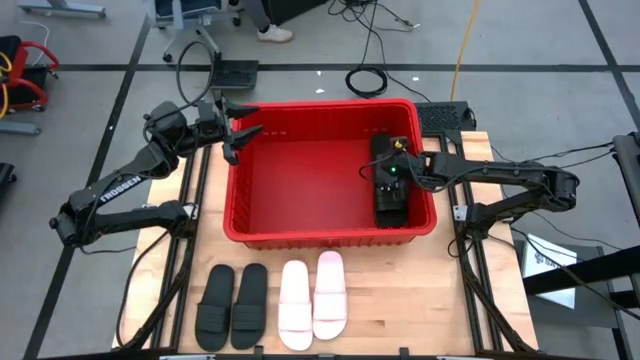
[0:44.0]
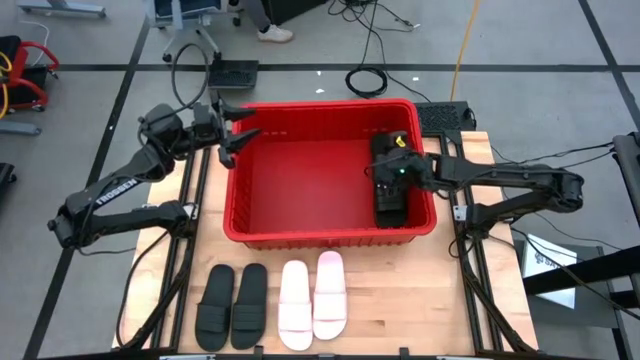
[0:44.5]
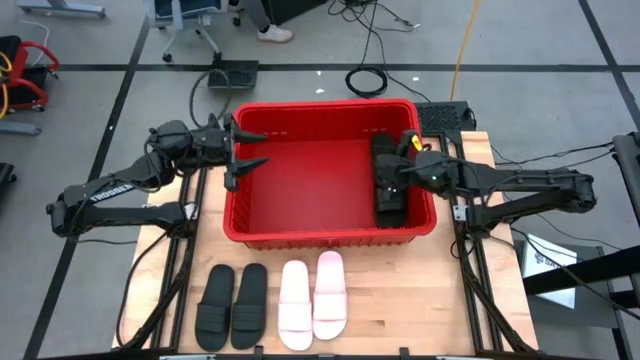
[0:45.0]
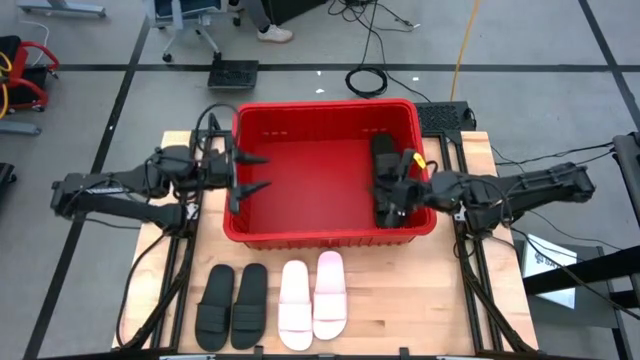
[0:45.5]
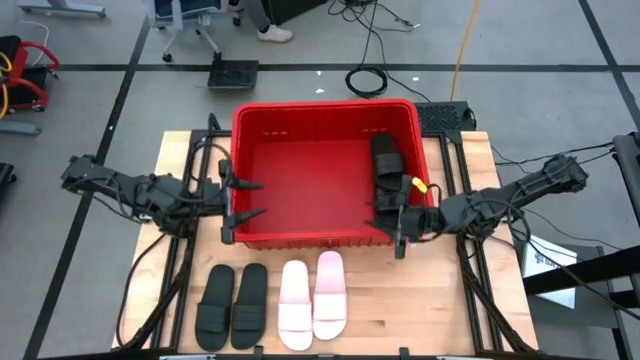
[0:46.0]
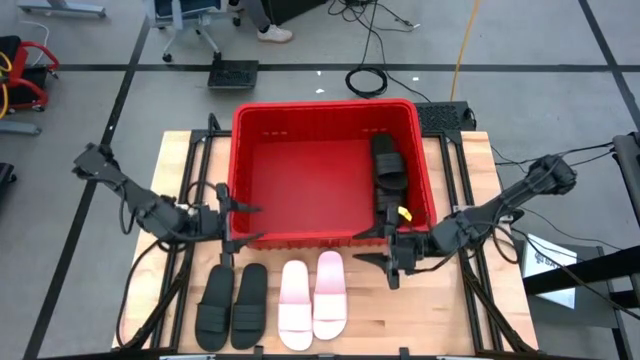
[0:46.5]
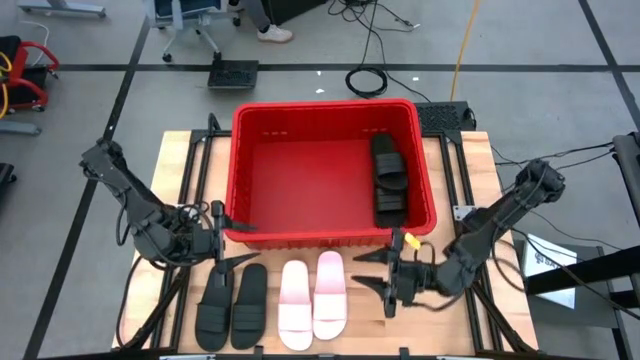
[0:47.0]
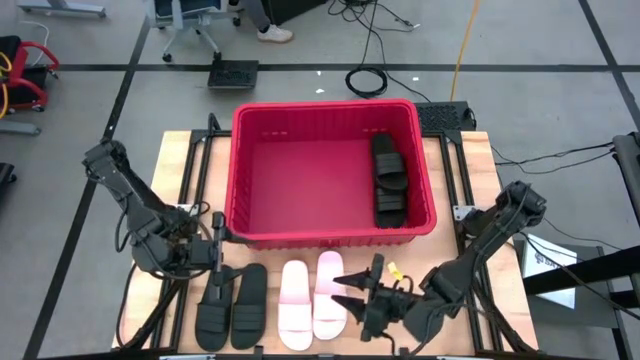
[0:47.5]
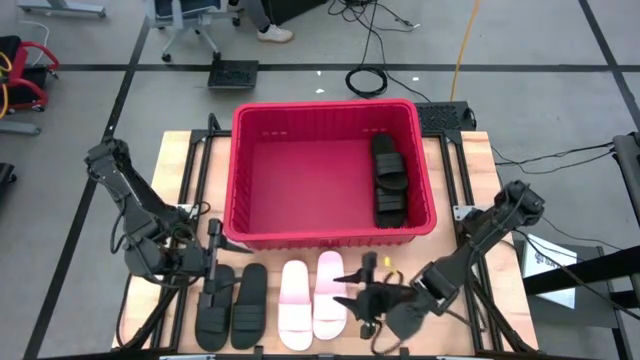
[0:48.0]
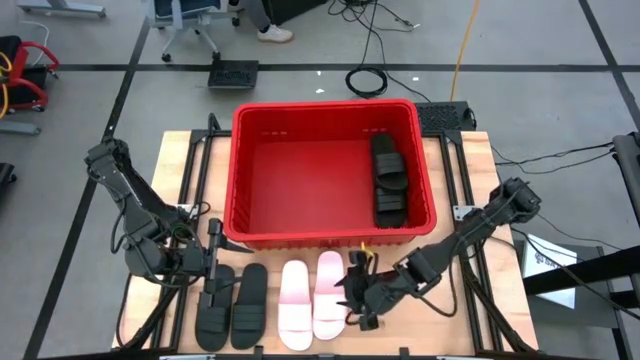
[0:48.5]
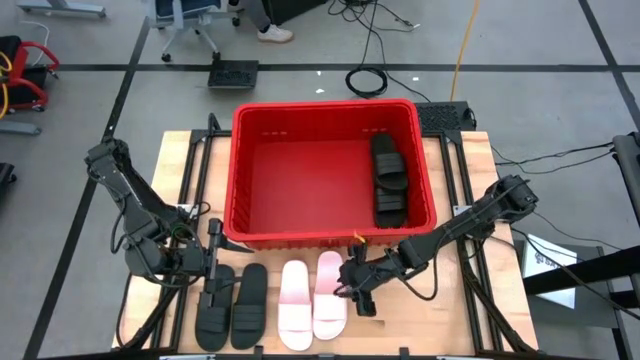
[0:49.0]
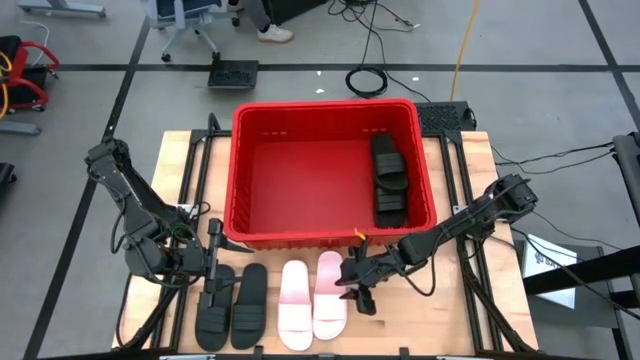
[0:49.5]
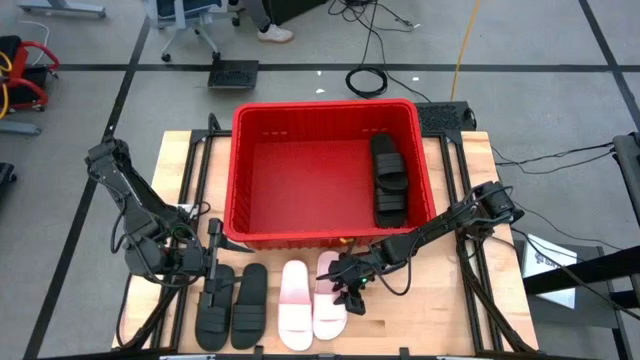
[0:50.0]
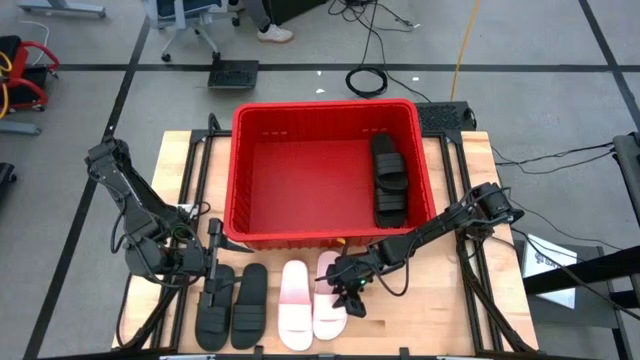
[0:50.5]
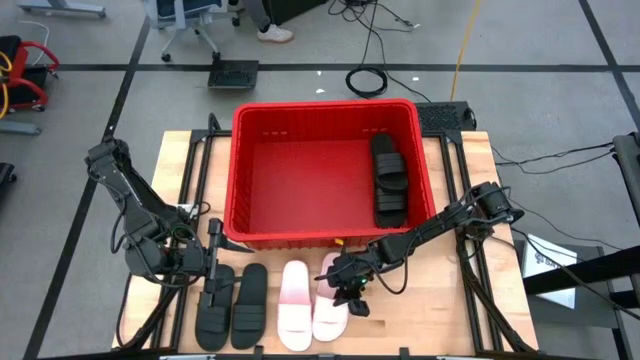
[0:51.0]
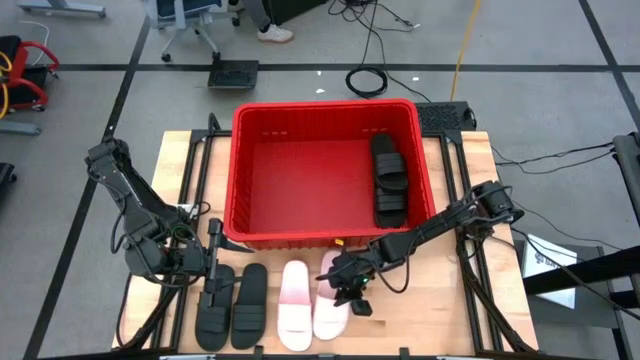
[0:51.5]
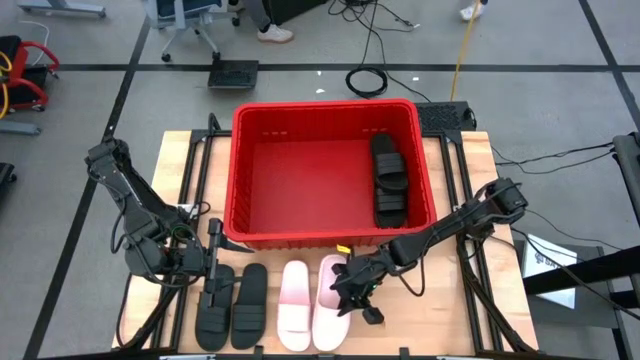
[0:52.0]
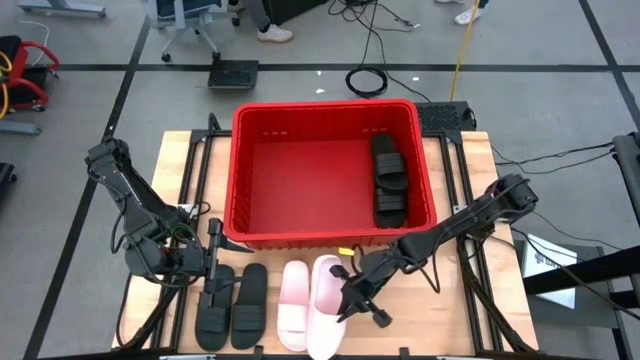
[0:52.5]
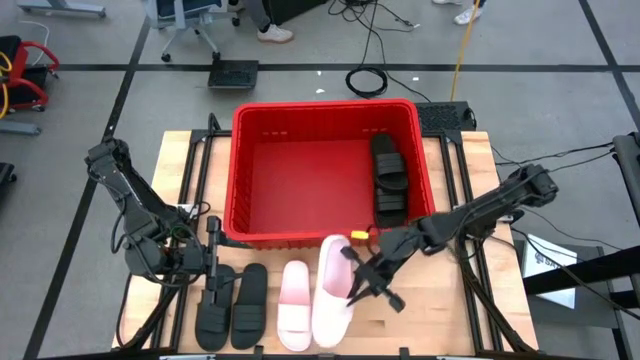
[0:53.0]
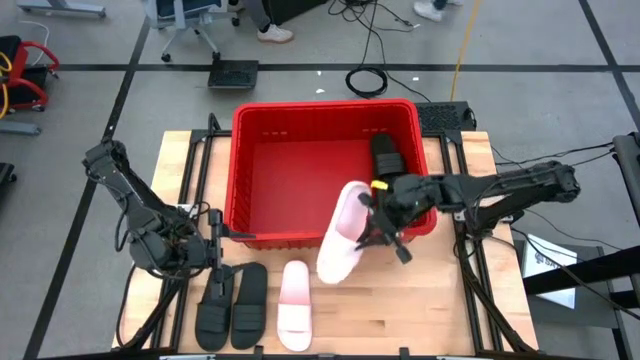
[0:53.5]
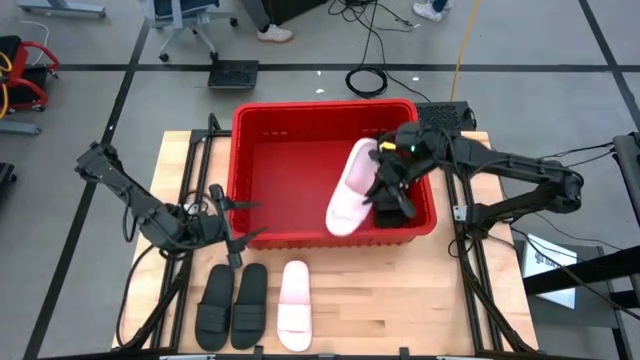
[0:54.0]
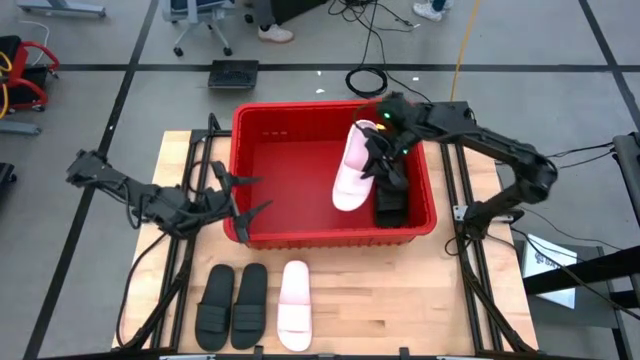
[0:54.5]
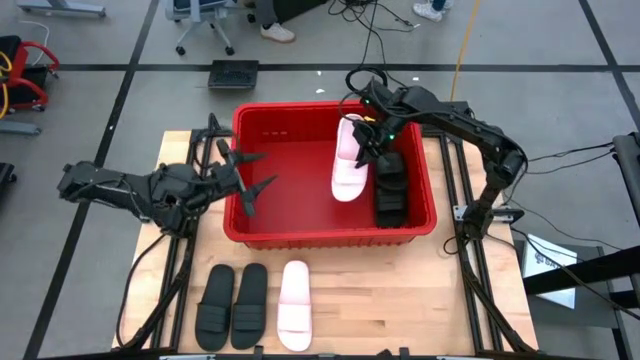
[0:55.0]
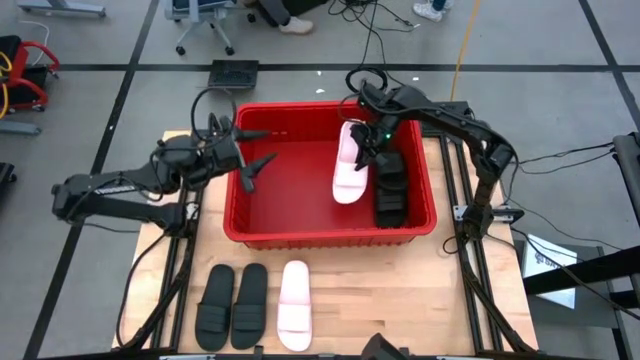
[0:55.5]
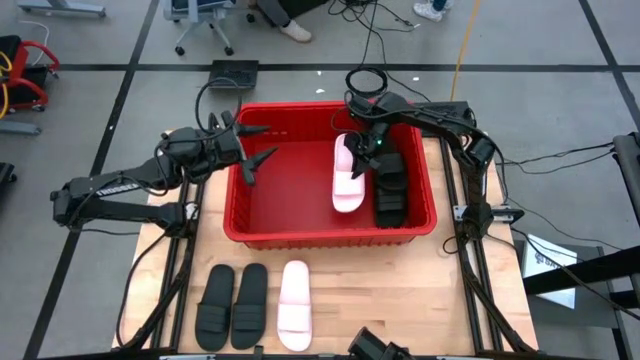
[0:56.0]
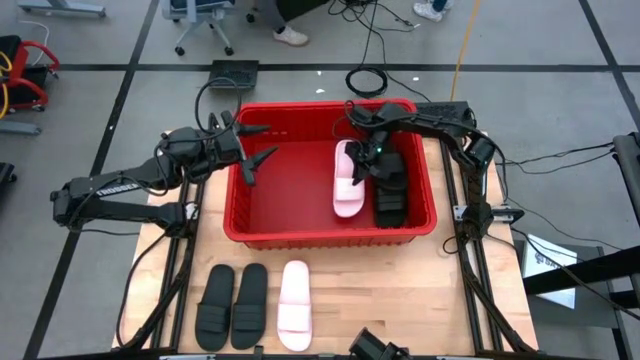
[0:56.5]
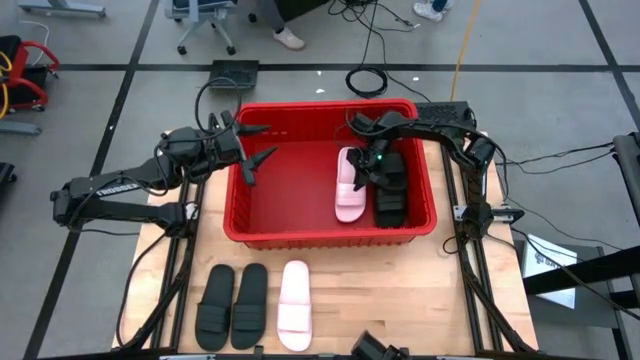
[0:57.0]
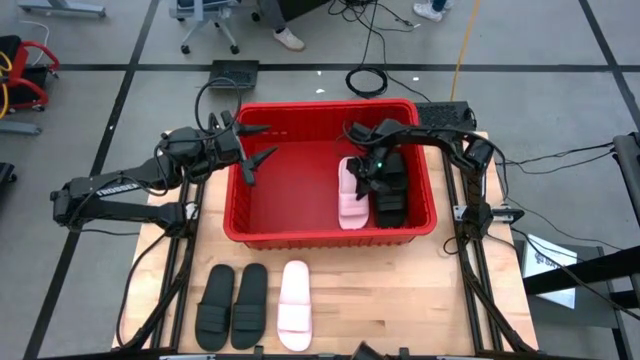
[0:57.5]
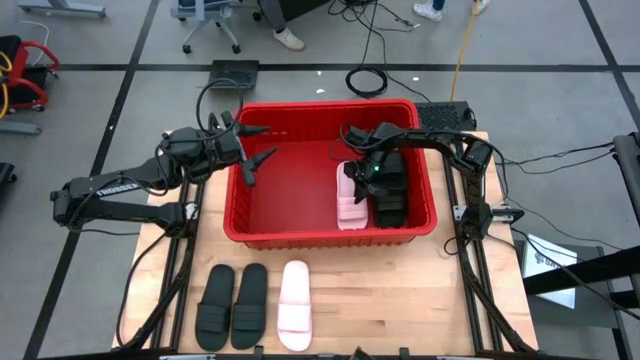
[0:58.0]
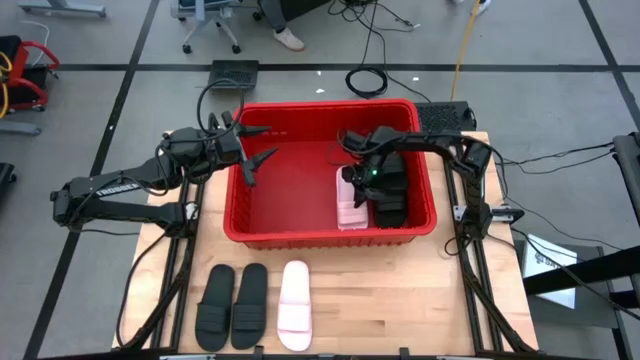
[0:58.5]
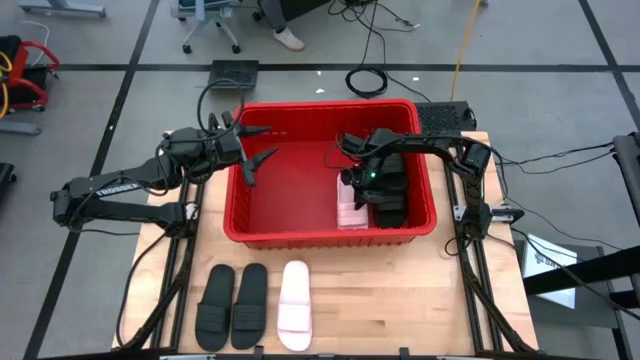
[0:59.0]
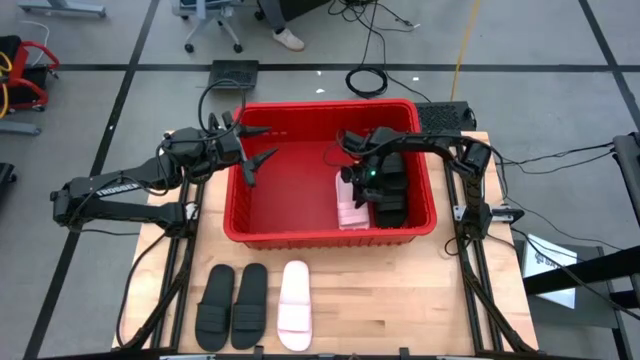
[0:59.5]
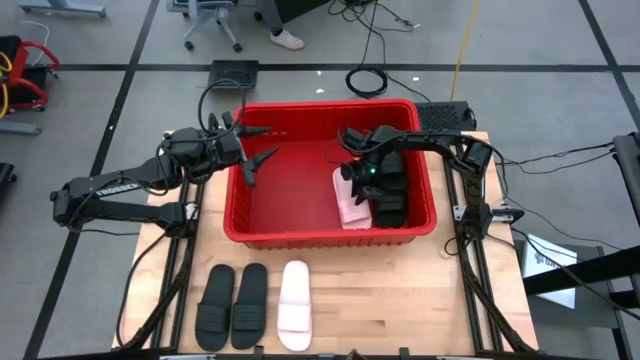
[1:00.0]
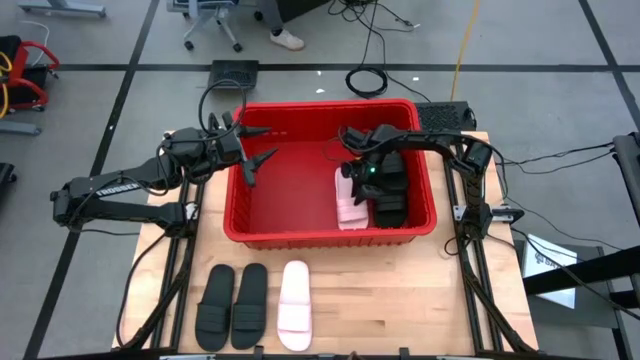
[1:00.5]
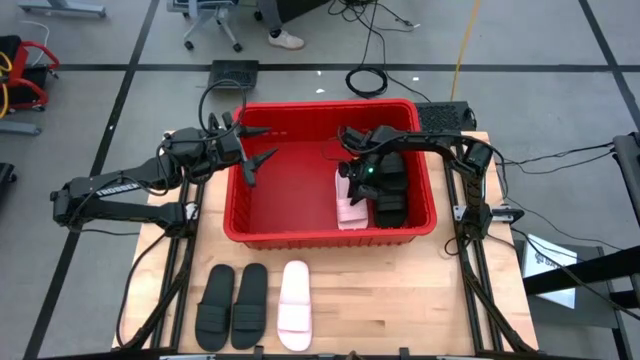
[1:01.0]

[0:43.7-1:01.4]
Task: Pick and place slides into bin
Put the right pink slide into the red container

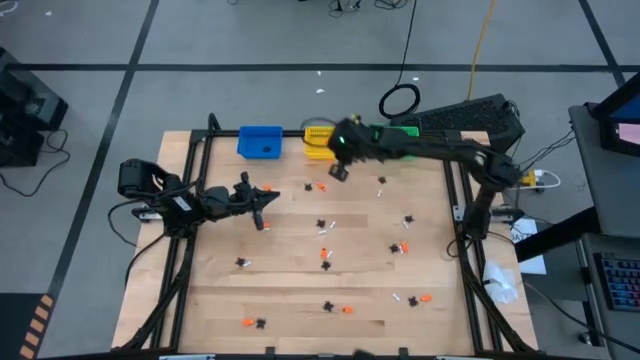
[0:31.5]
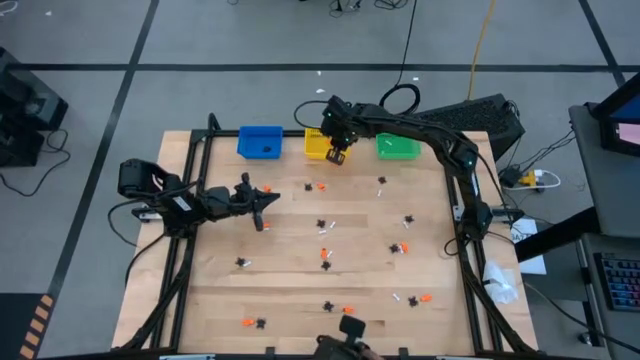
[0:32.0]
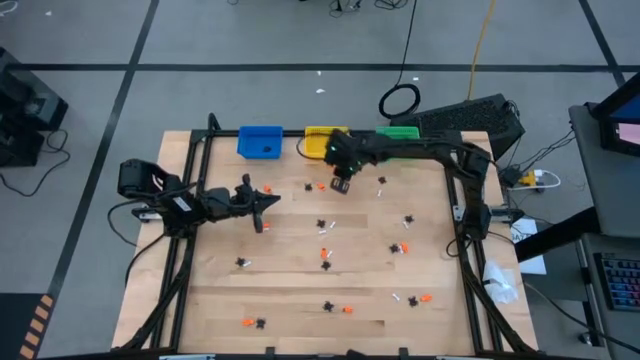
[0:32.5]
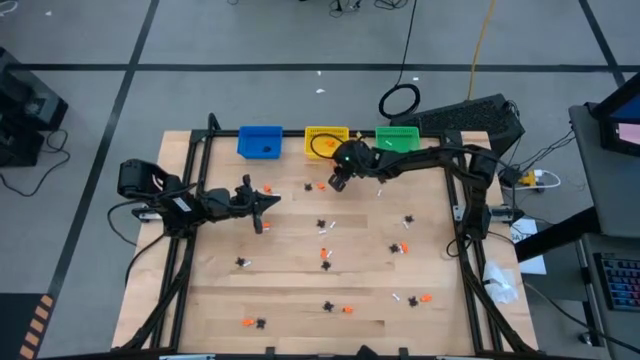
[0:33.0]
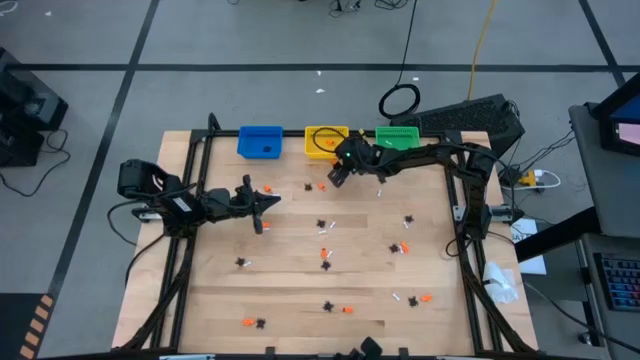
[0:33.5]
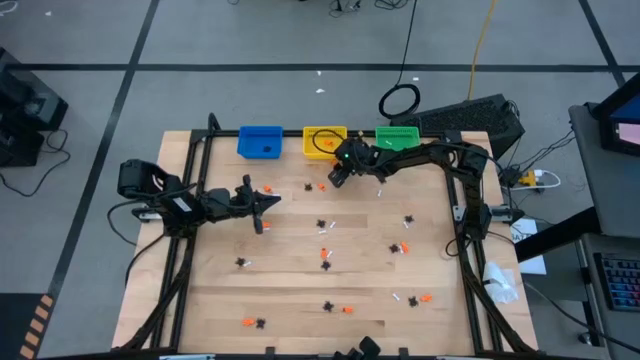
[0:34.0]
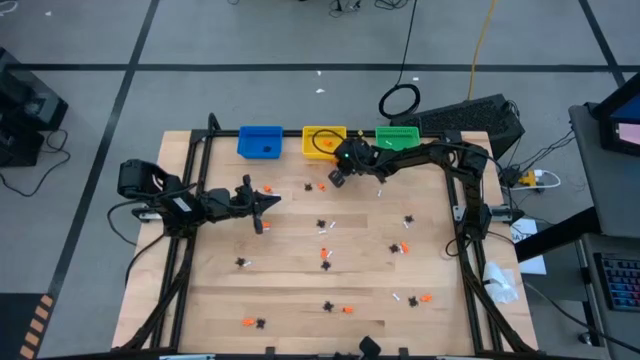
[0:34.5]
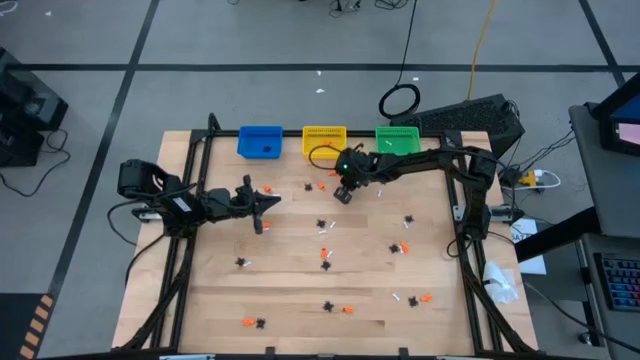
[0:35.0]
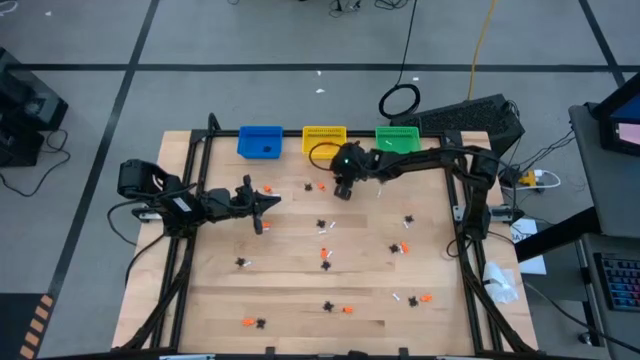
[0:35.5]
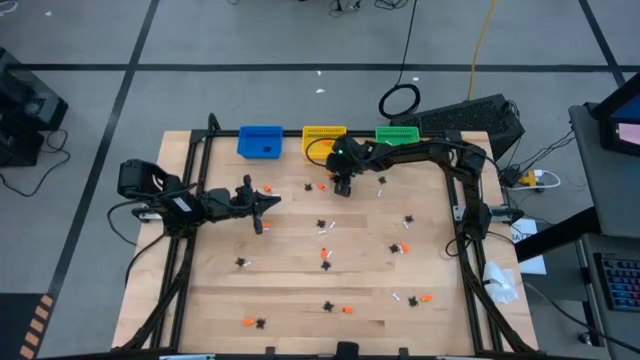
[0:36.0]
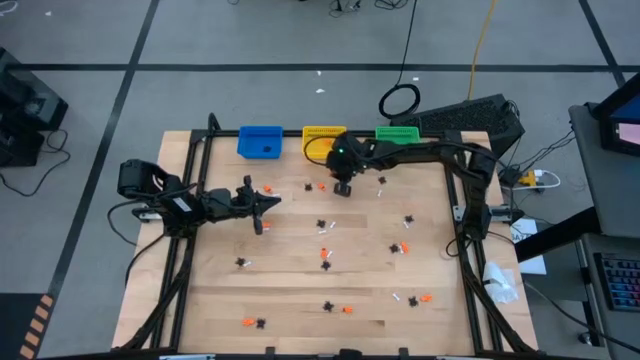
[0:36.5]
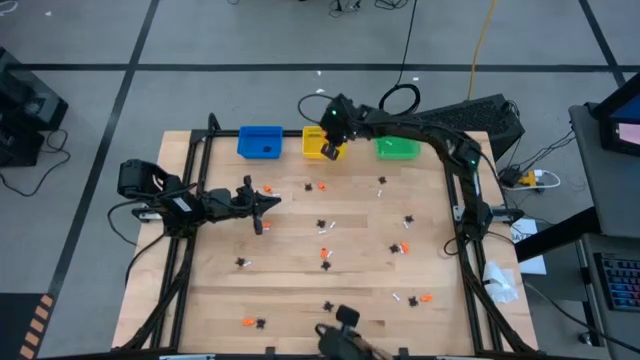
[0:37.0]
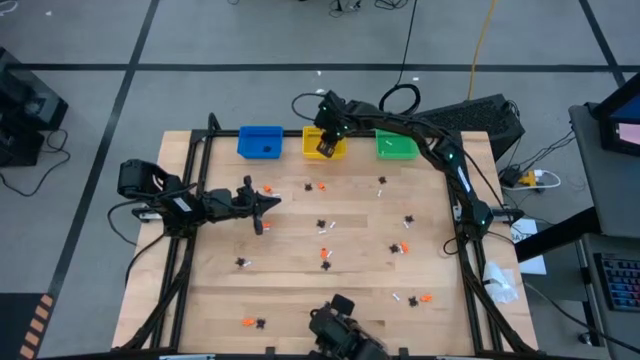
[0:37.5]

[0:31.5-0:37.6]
Task: Sort Halloween decoration
Put the orange skeleton toy into the yellow bin
